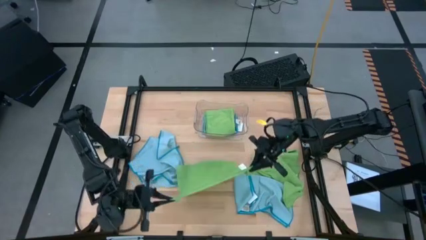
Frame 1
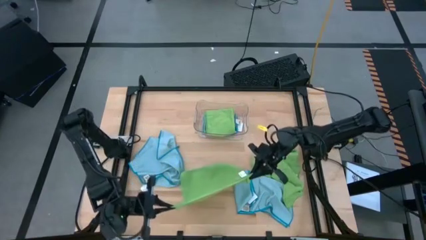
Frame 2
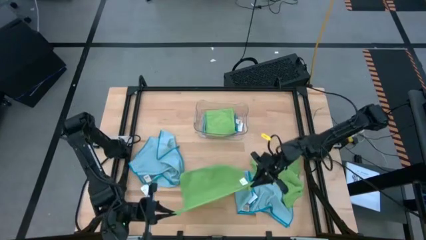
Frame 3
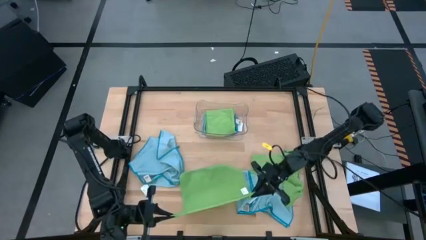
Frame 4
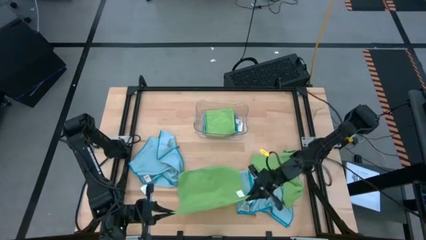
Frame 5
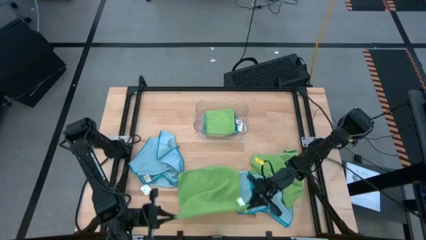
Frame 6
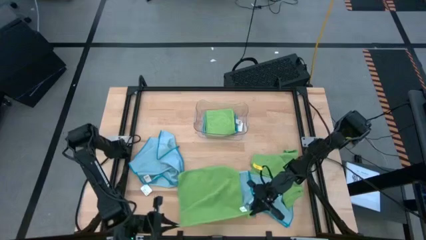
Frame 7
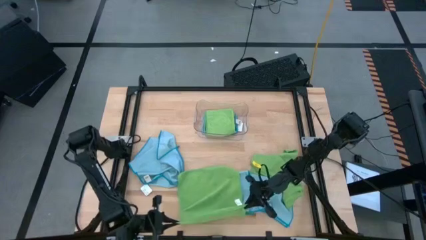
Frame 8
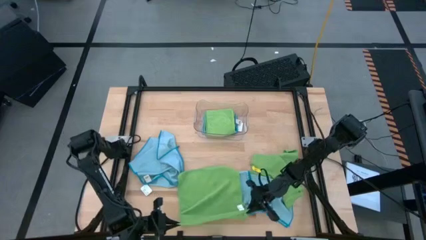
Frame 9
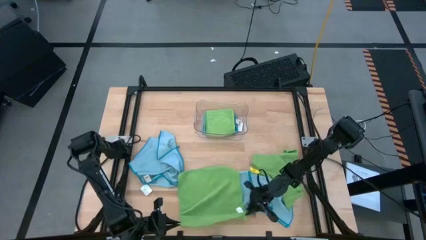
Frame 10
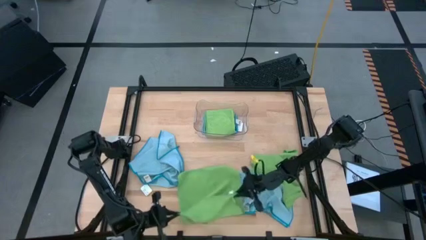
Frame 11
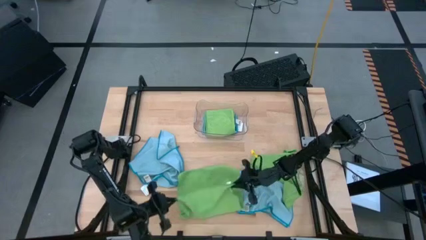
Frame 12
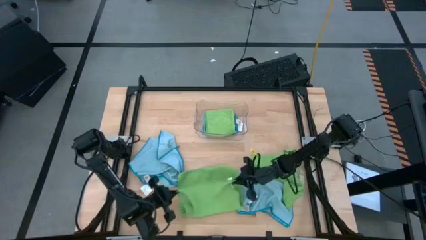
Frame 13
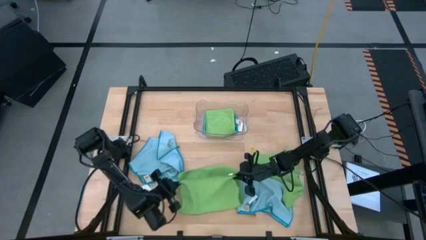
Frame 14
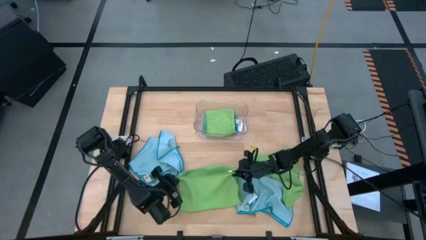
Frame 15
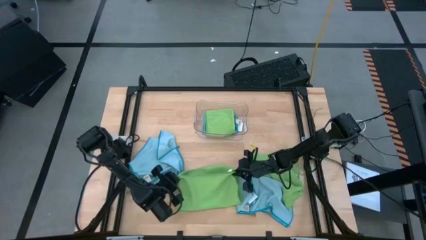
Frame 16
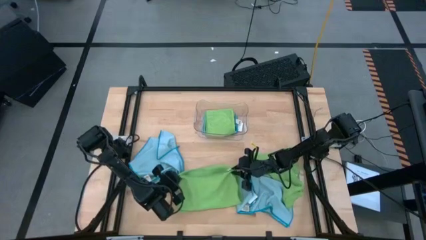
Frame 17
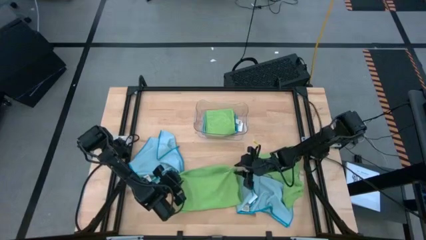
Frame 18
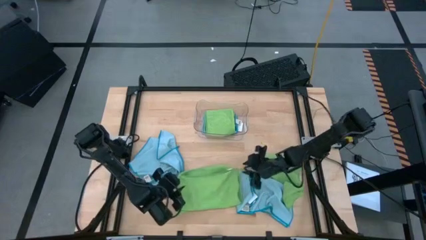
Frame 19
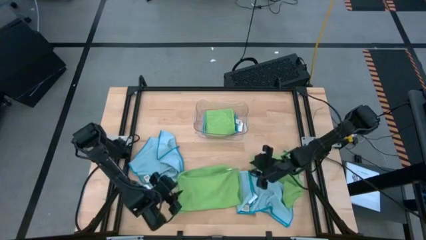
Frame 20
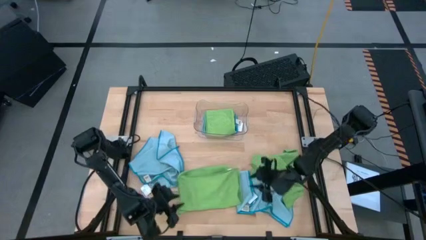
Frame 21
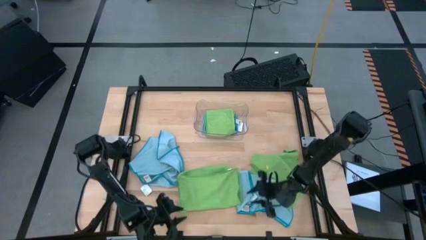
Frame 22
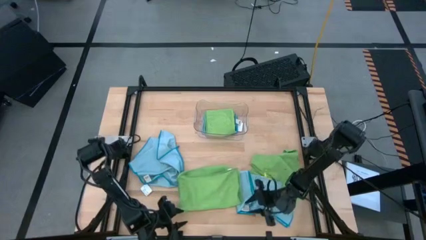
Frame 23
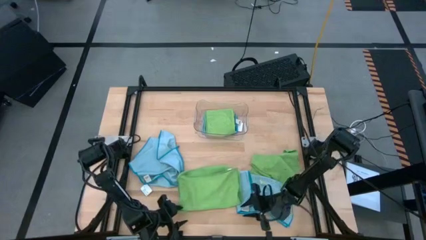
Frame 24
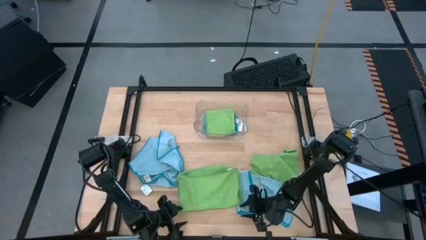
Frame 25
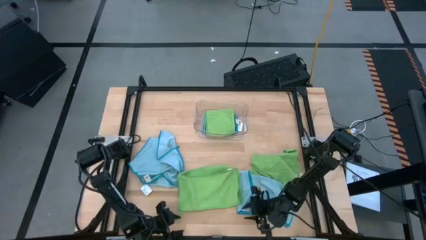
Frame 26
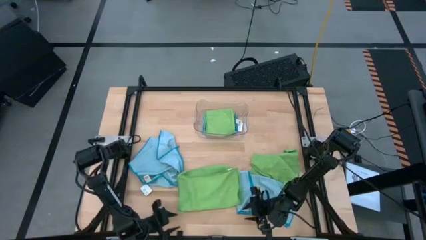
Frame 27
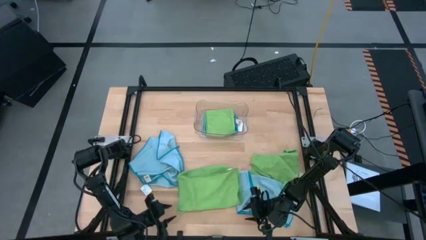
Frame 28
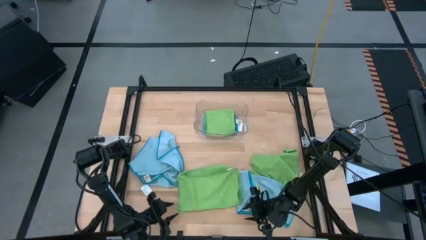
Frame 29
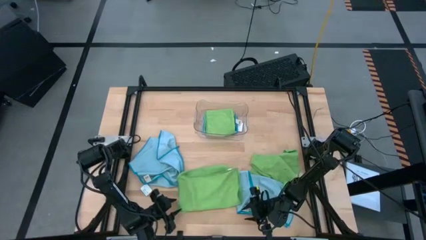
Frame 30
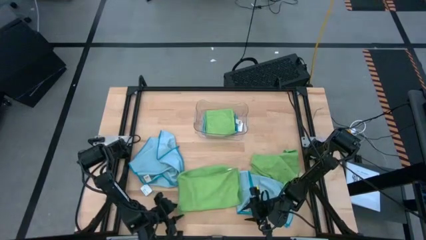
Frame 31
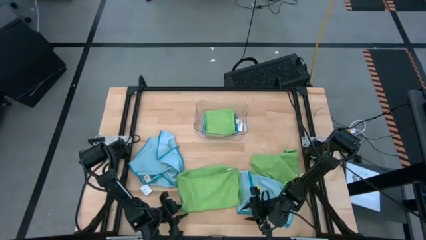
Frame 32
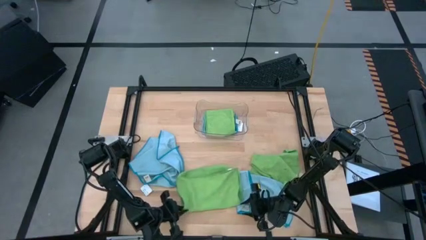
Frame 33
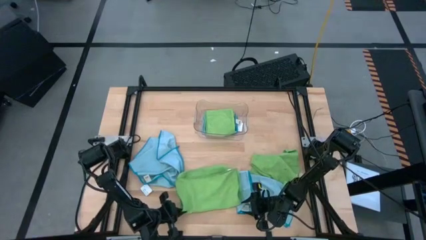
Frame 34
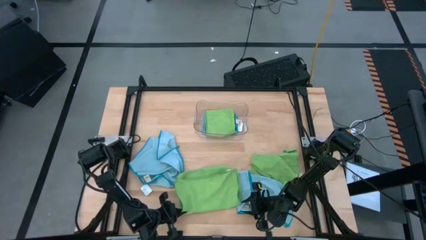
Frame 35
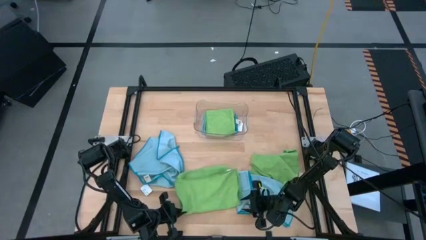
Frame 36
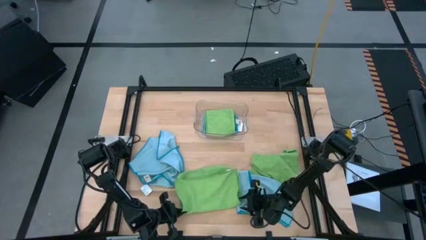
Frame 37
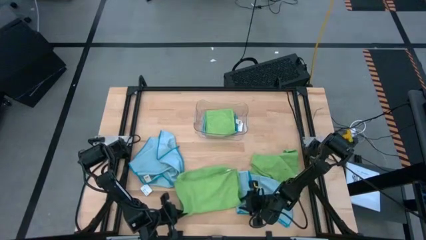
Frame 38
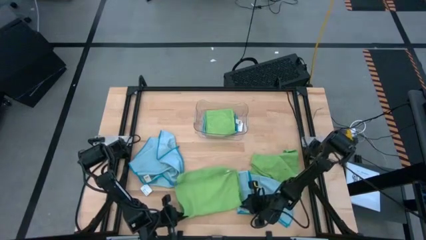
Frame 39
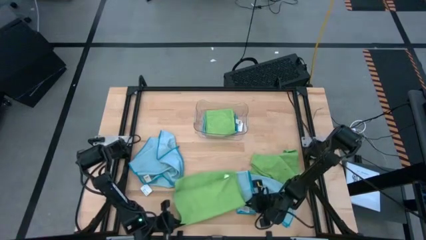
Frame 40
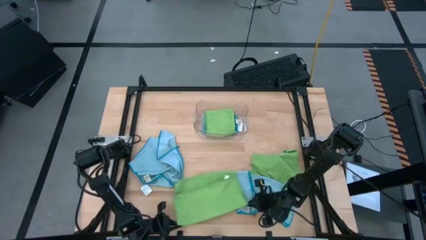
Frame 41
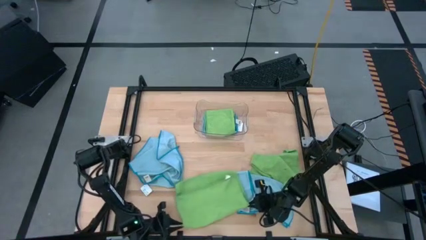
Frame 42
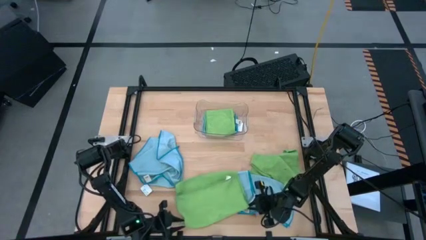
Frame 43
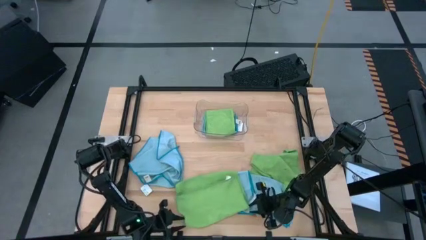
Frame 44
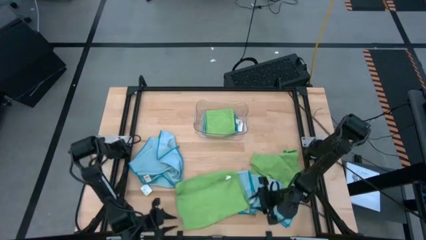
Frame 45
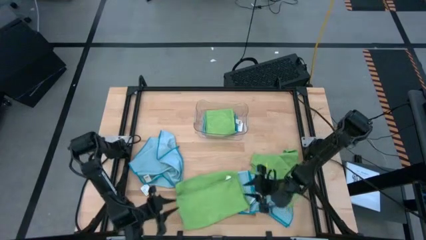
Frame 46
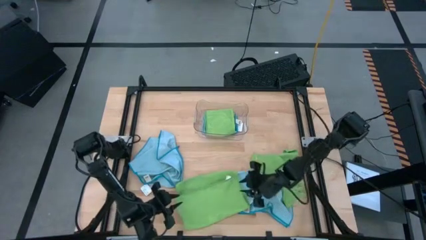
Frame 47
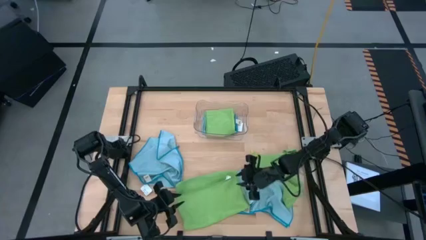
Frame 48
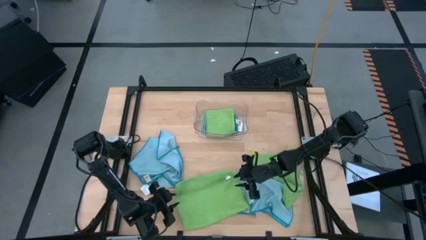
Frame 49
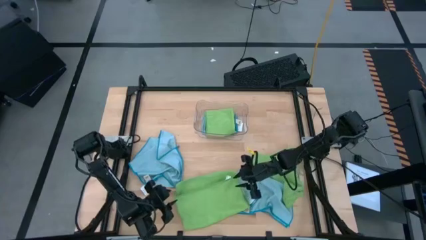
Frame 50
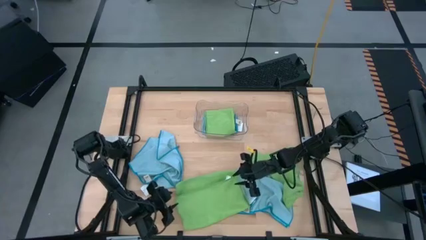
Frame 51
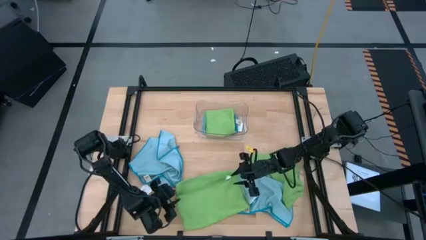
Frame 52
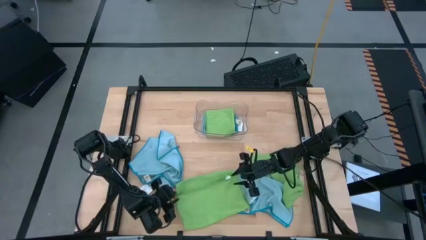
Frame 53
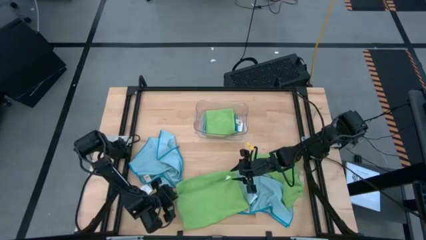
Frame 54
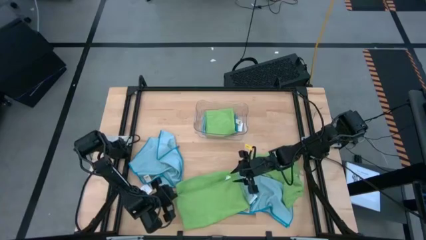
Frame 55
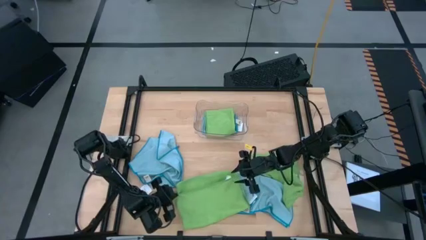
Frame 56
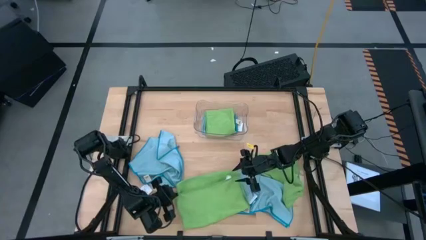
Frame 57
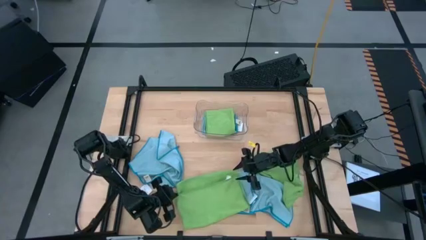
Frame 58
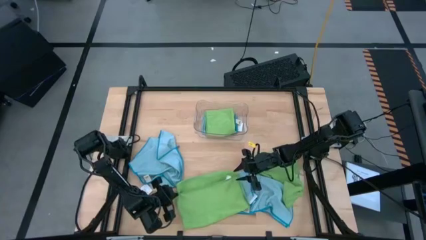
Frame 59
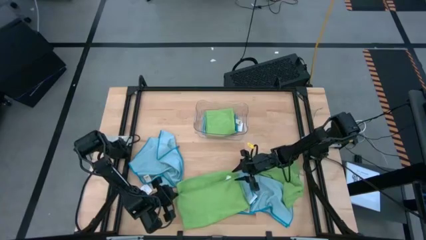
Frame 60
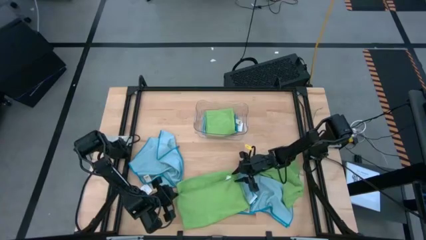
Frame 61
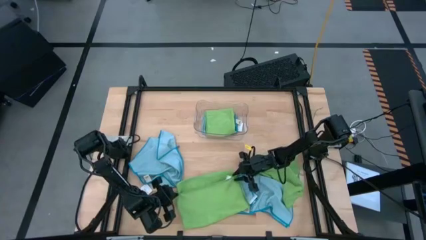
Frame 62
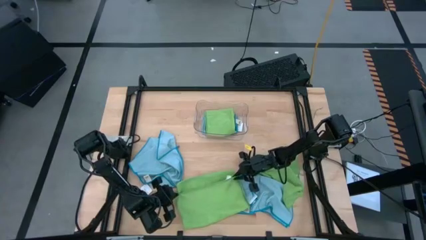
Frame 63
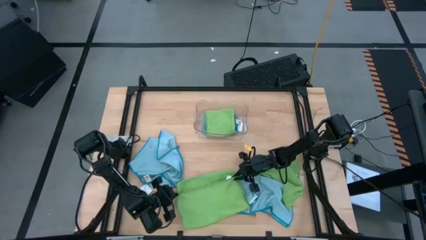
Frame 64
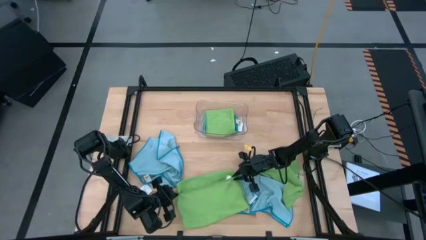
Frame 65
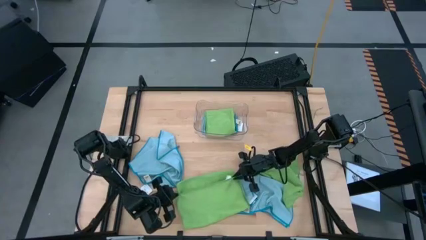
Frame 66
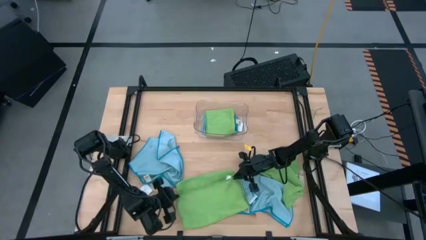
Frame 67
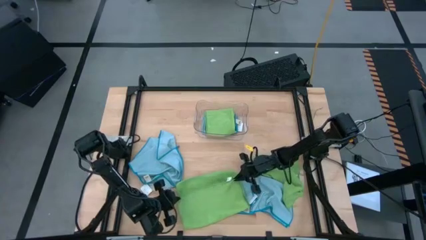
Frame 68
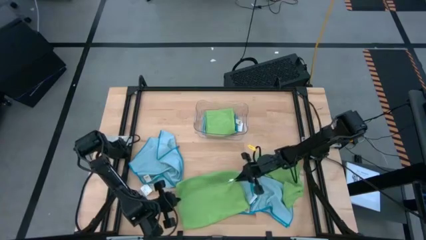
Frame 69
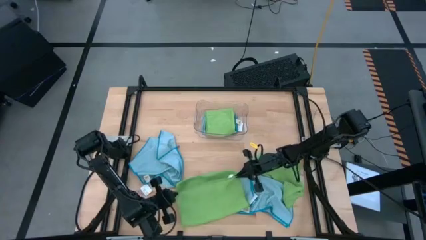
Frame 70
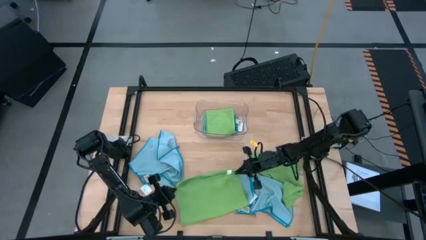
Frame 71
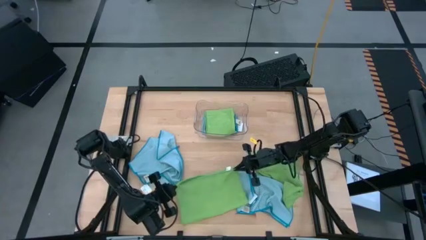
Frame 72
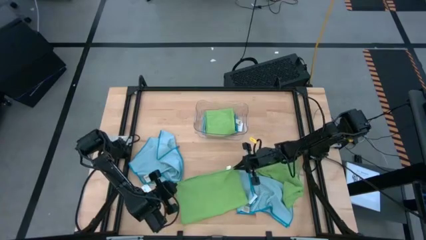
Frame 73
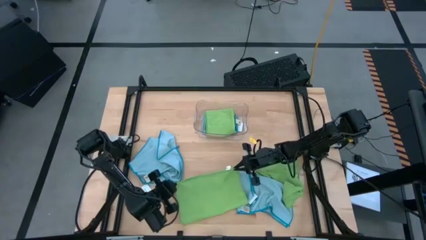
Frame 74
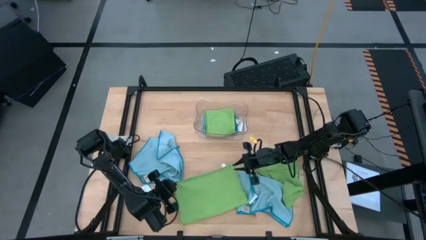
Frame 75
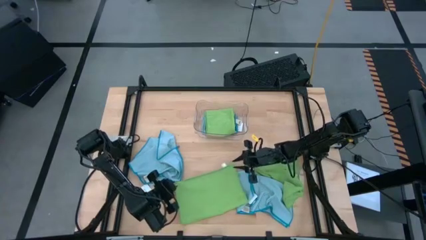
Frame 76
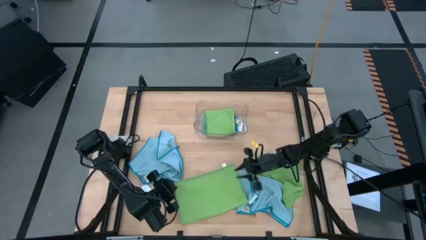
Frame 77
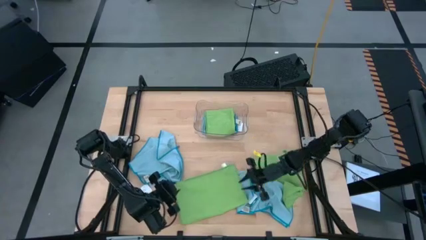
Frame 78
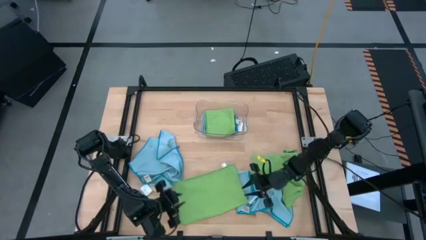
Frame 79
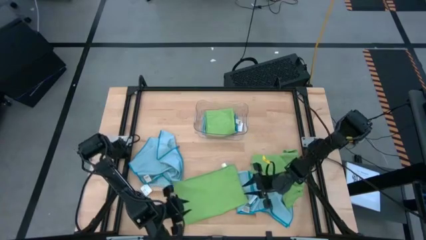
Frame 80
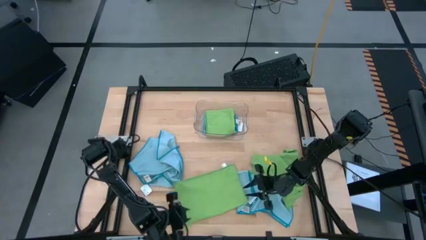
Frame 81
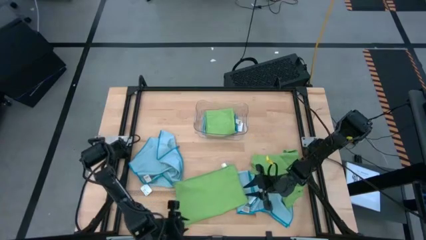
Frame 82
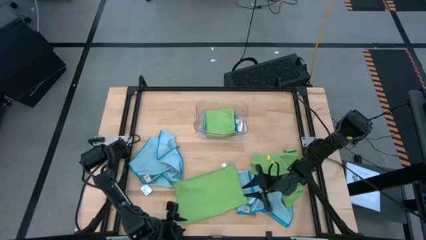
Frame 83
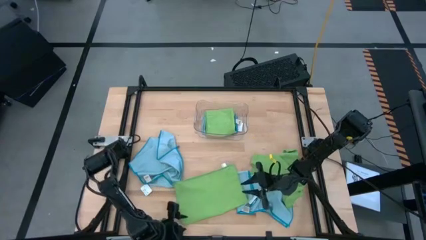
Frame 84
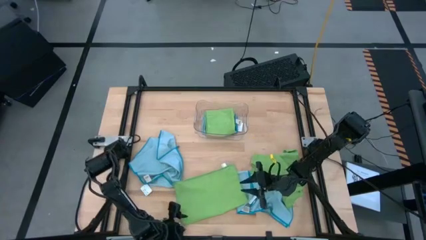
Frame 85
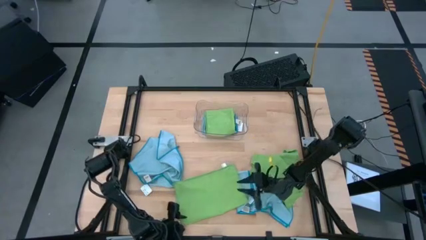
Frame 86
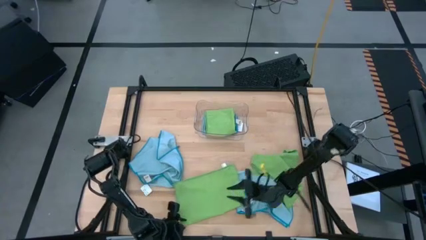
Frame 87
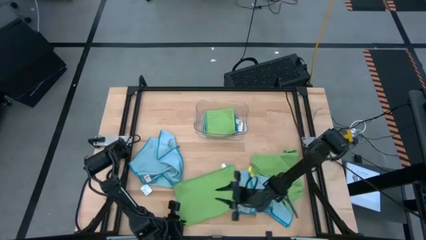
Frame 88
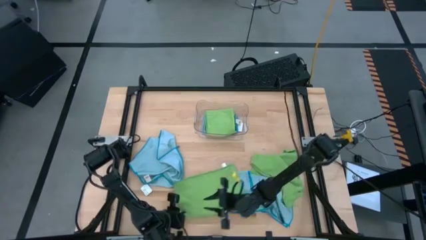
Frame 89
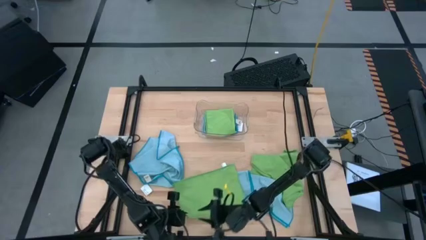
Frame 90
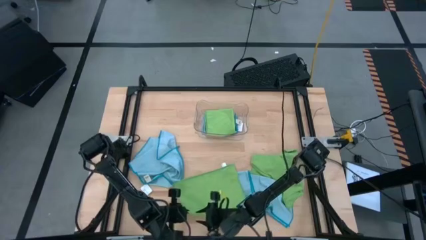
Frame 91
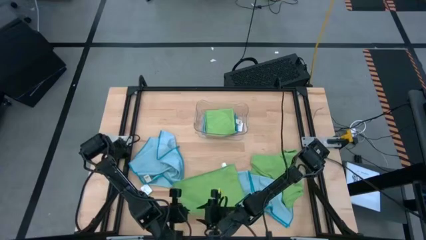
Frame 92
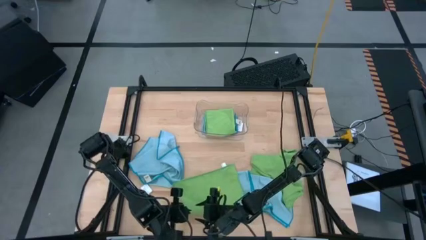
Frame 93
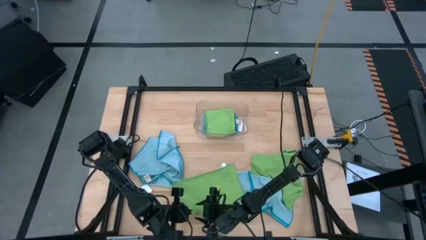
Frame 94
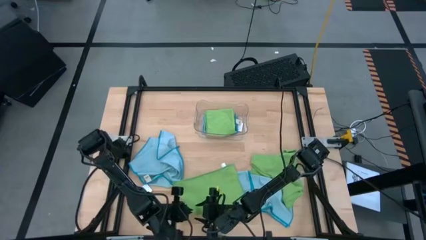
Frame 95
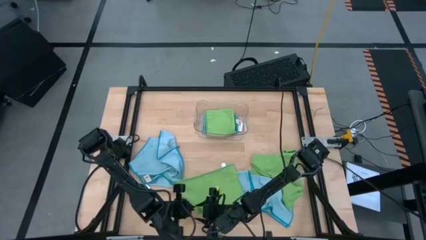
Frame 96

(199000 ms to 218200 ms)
Task: Fold microfiber towels
Fold the left green microfiber cloth
